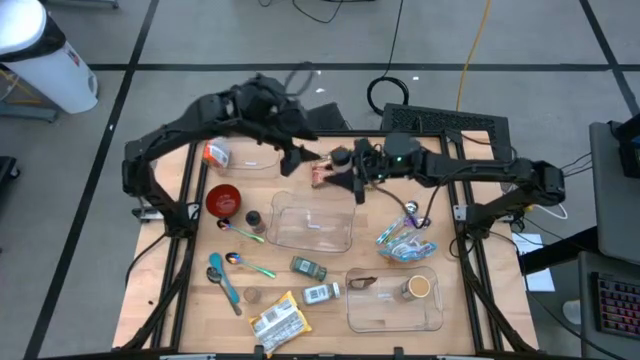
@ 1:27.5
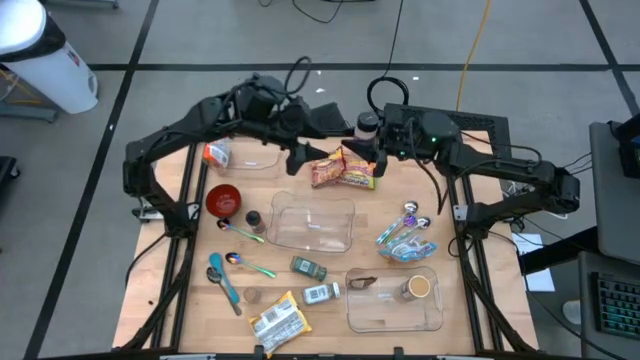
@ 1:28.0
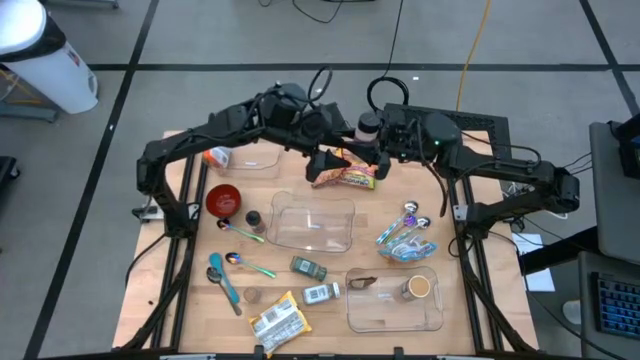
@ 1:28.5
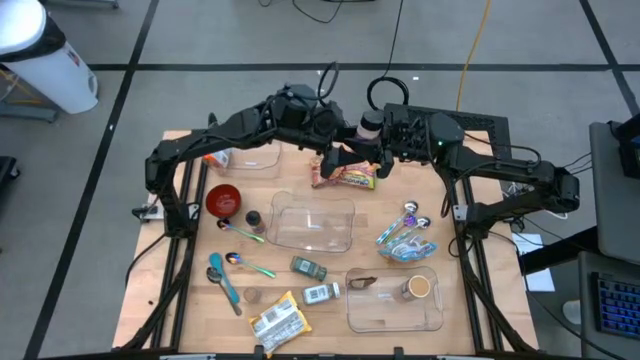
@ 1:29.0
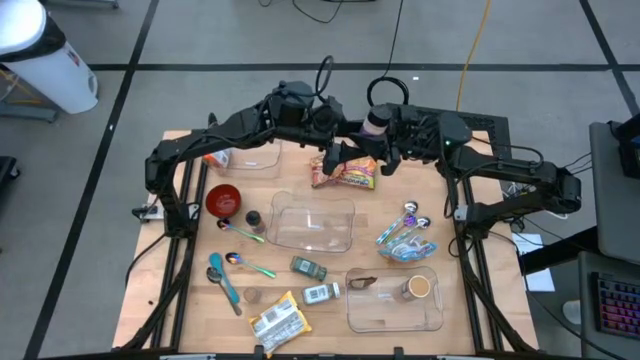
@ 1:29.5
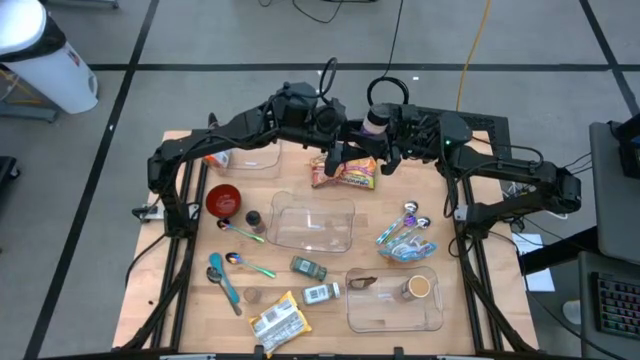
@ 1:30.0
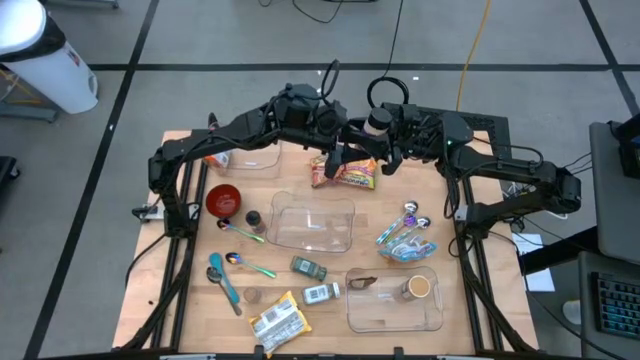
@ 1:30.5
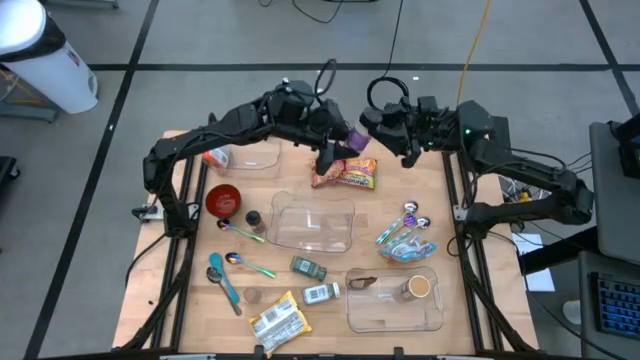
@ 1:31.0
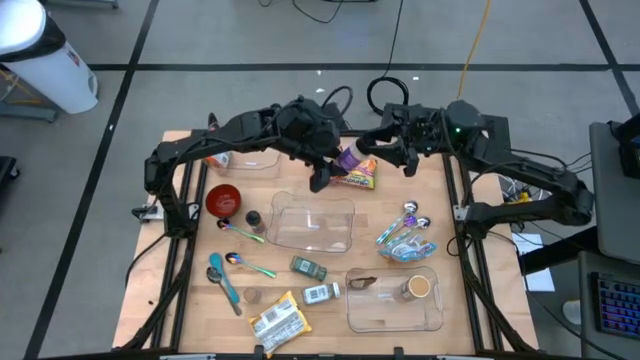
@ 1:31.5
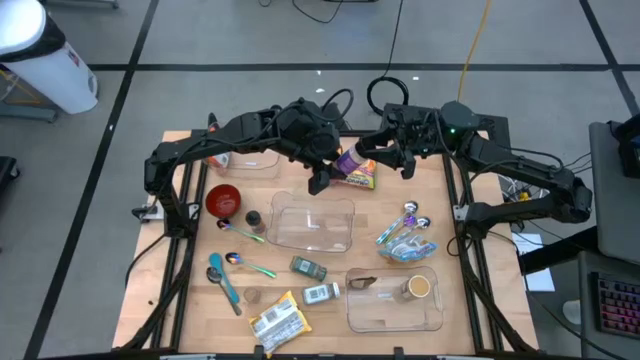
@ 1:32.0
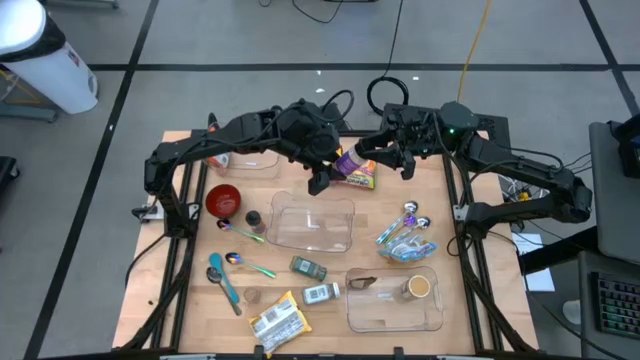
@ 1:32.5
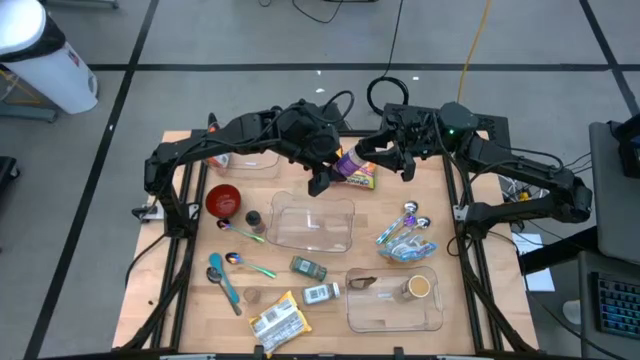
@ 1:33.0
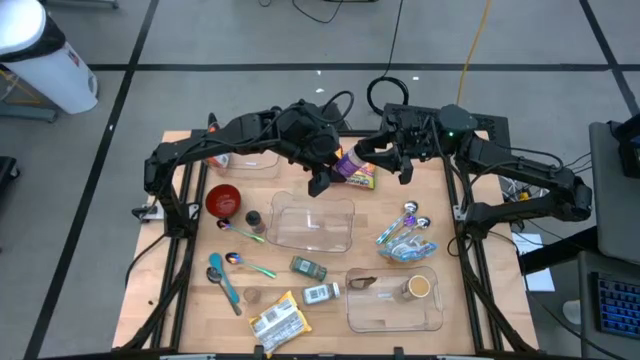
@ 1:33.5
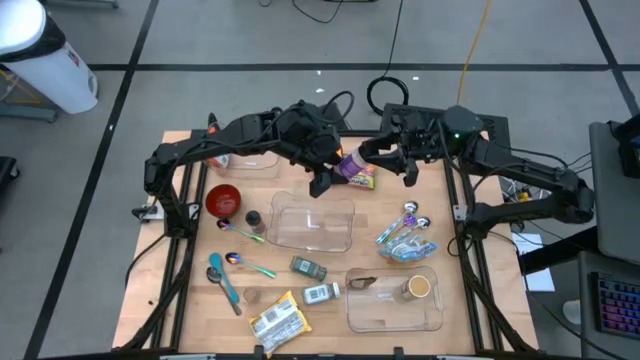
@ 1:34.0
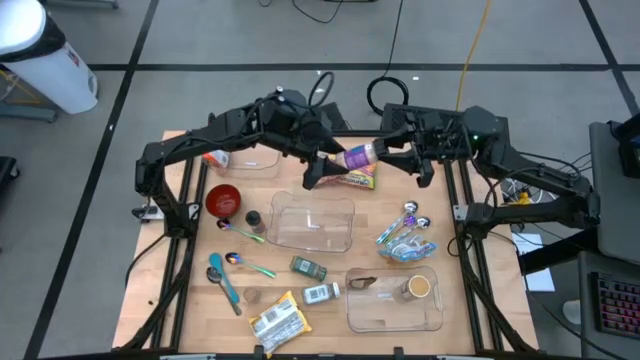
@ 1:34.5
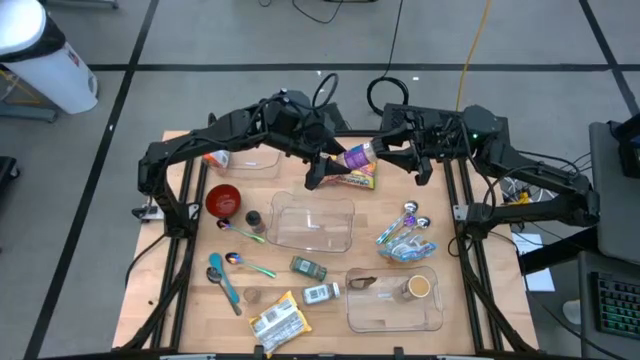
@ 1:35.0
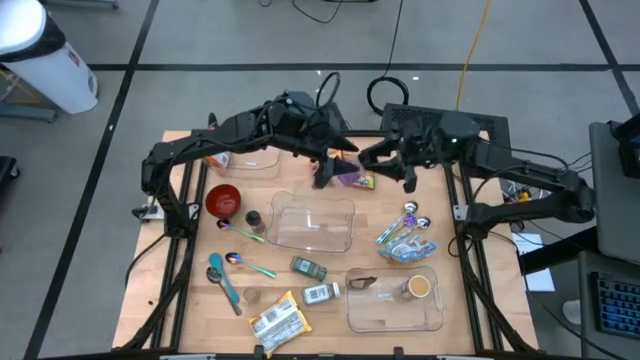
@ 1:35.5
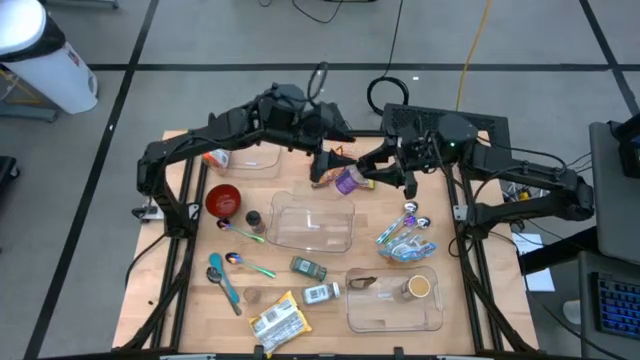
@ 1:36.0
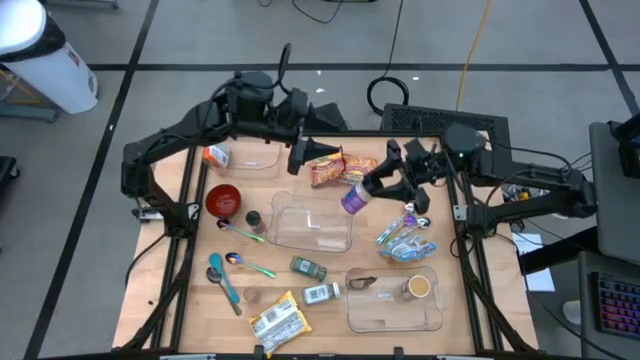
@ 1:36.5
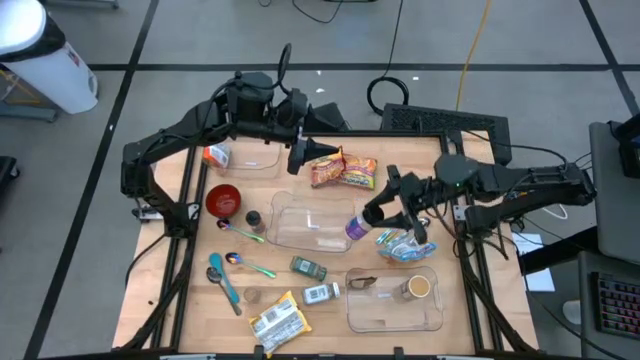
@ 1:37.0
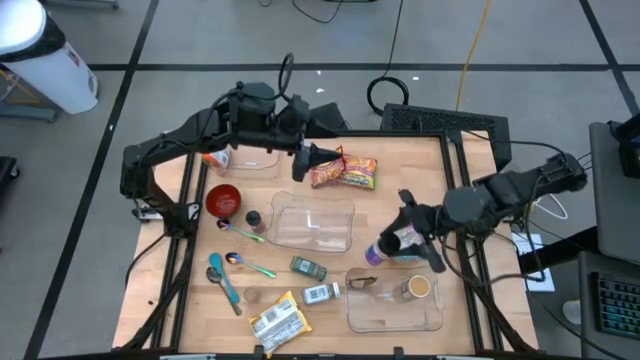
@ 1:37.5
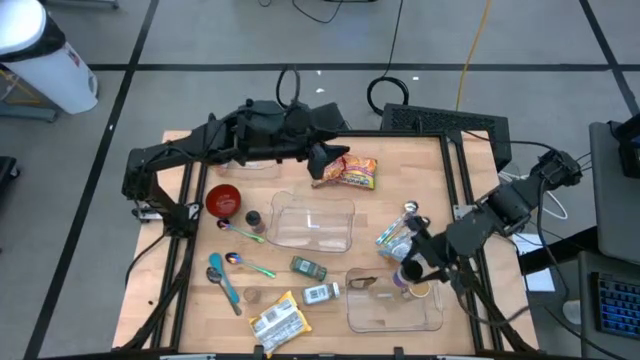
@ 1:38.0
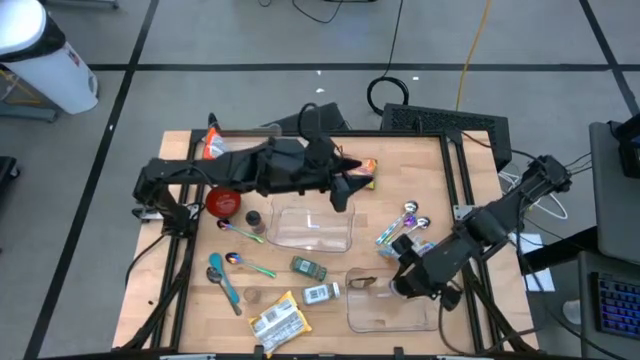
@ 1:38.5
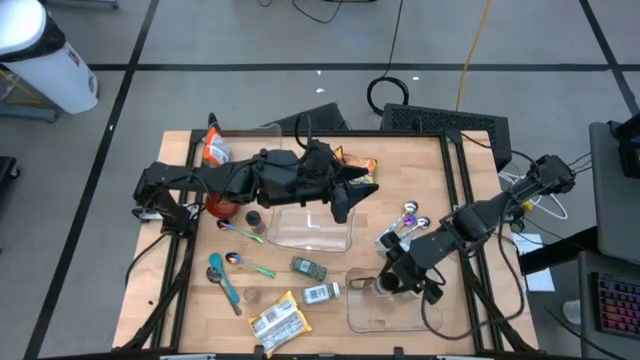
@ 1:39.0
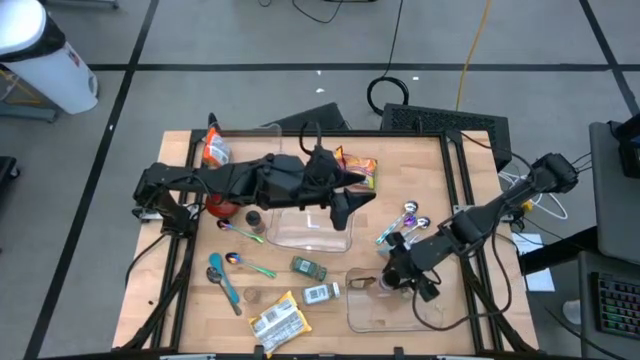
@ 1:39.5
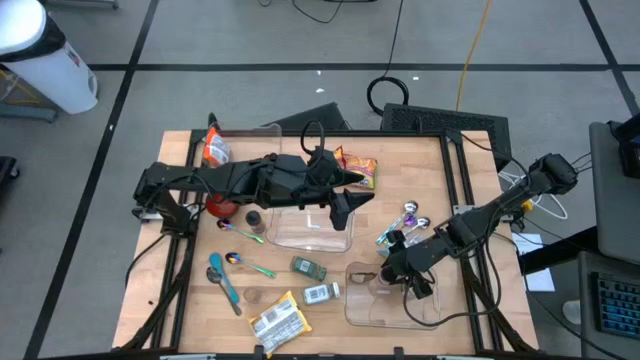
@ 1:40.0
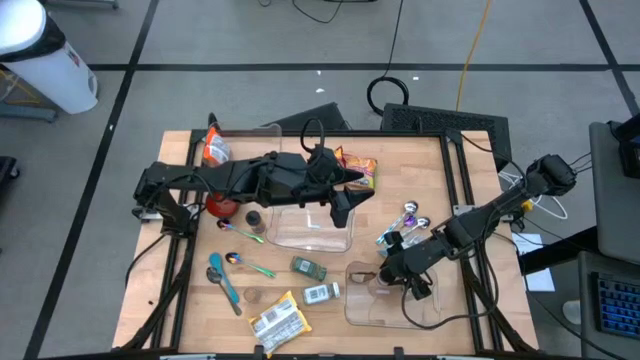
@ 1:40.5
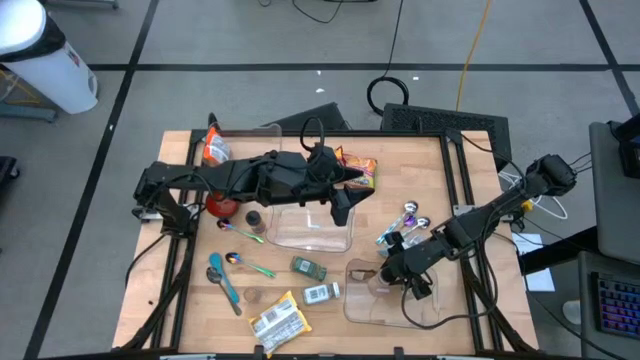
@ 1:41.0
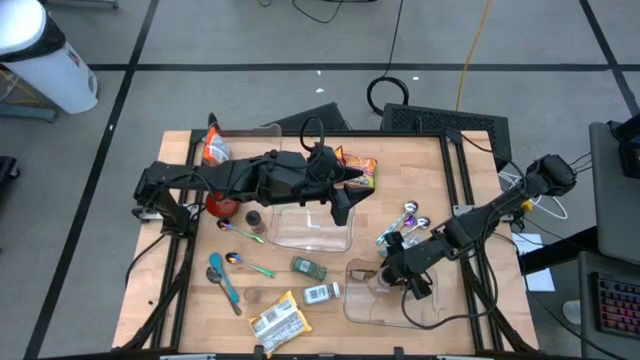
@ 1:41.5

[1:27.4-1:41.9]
Task: Pick & Place Food Item
Put the purple seasoning bottle into the bottom transparent bin

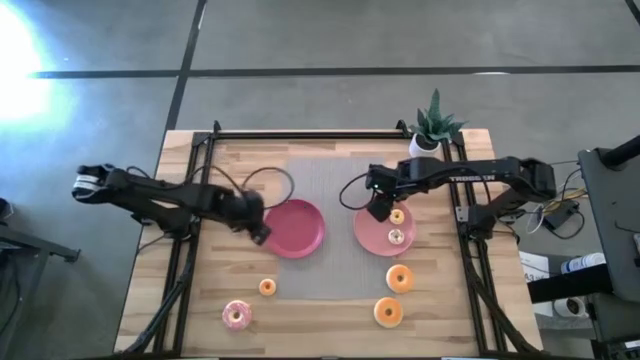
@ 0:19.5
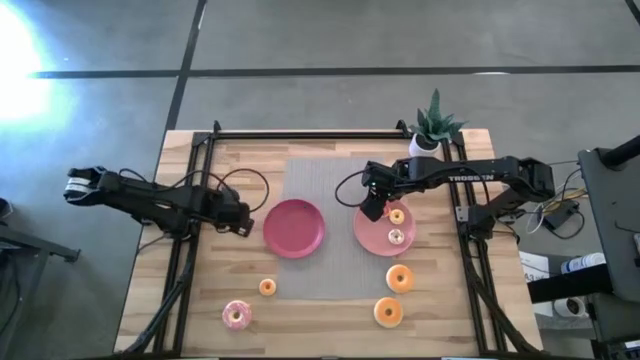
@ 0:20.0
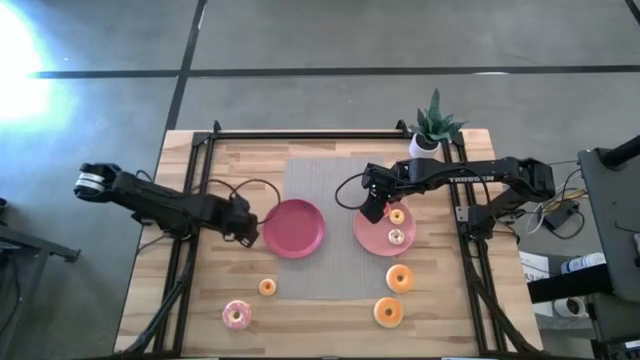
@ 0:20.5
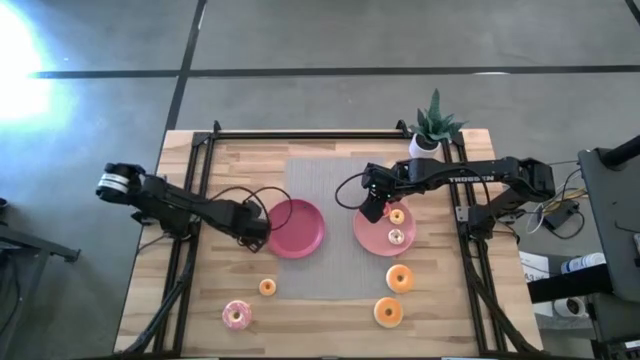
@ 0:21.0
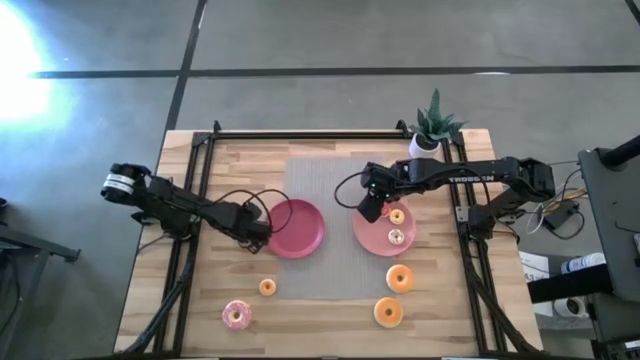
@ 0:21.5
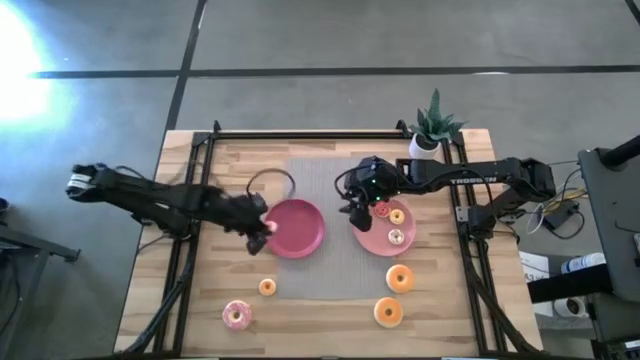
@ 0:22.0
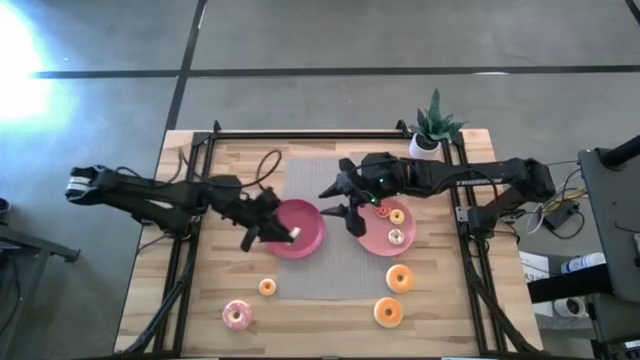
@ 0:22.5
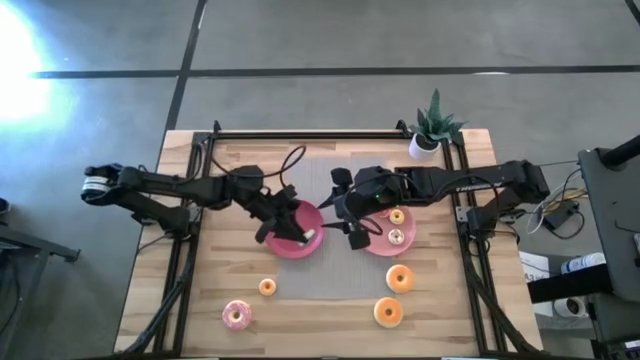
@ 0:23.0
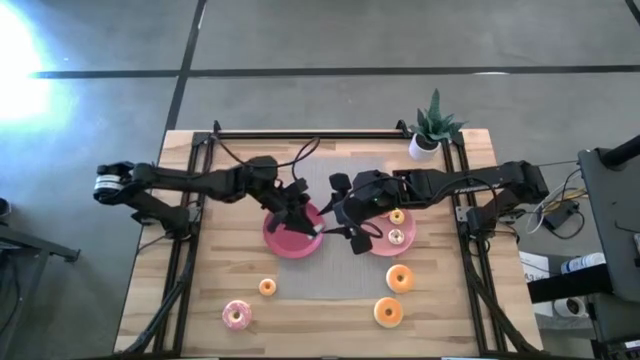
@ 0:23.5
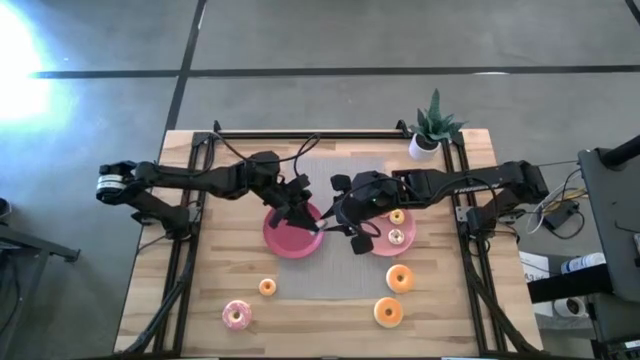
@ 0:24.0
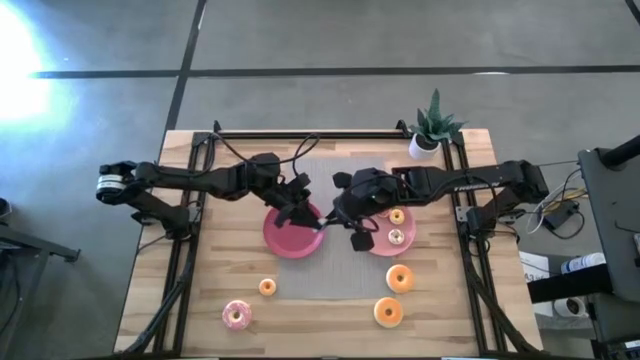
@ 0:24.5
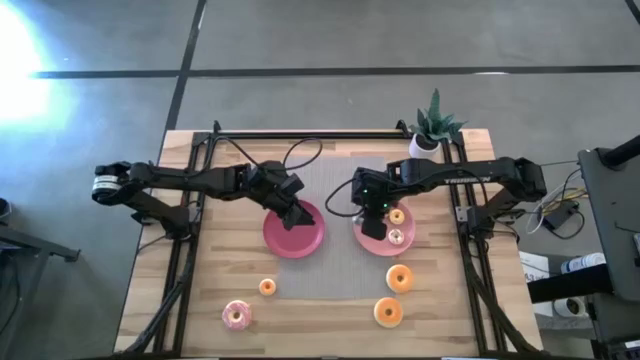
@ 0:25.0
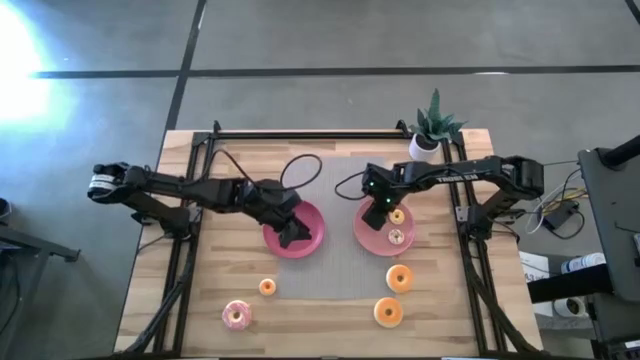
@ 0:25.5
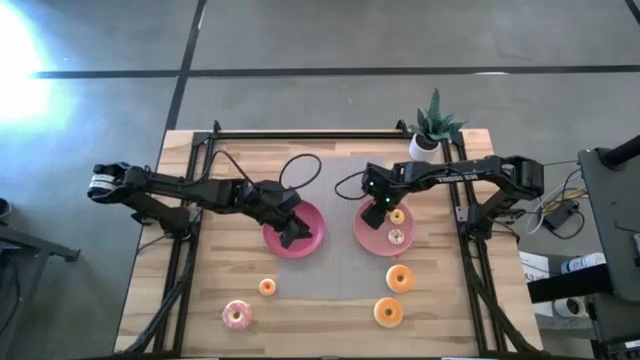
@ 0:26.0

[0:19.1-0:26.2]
Task: Pick & Place donuts
Put the small blue donut on the light pink plate
